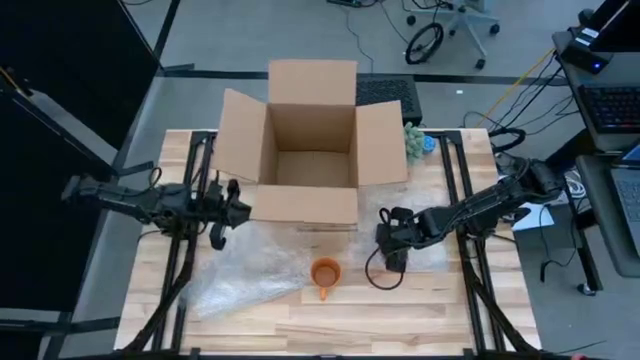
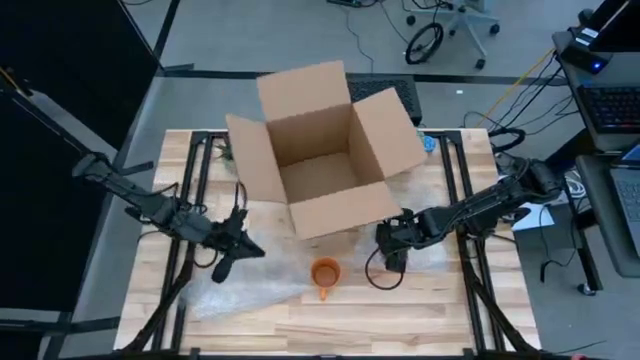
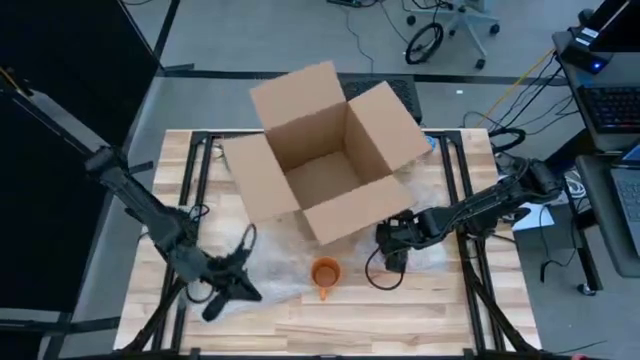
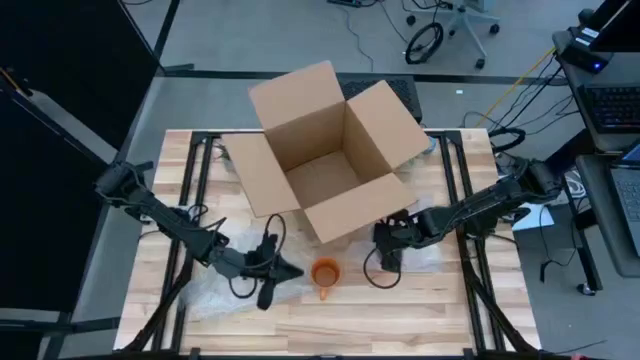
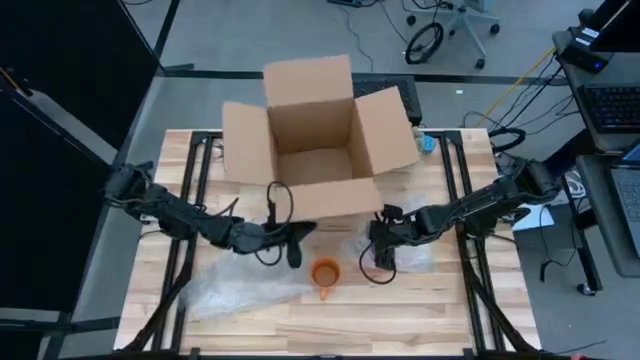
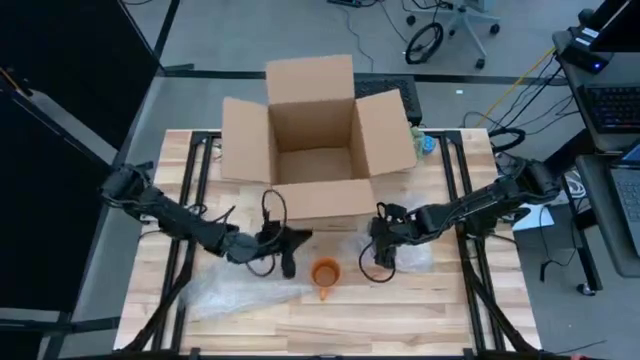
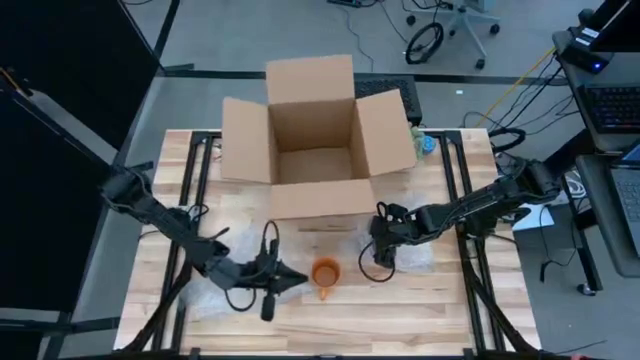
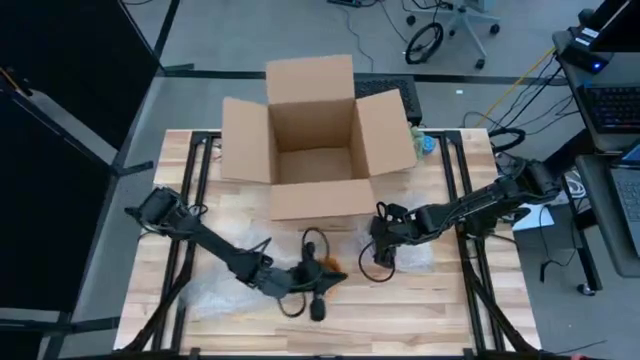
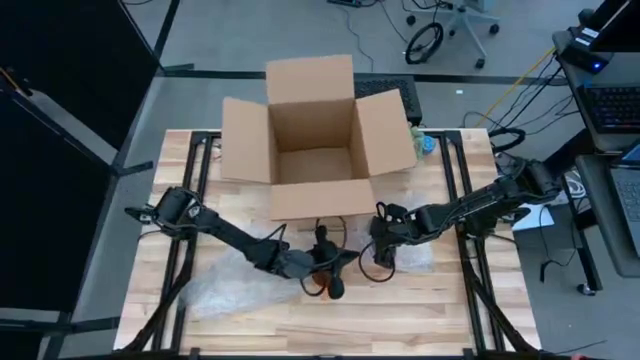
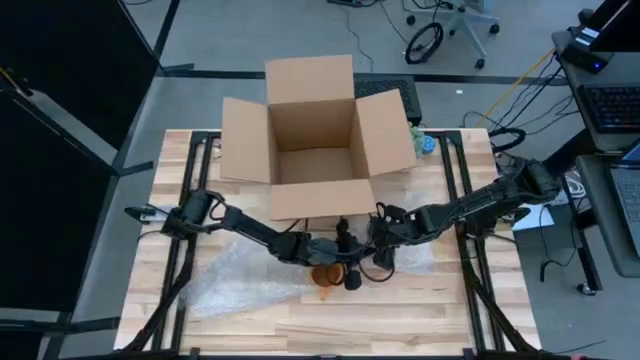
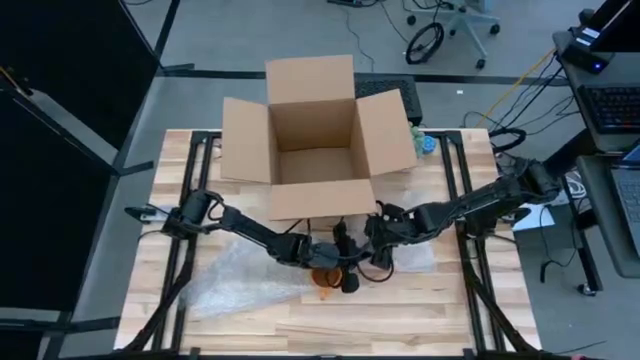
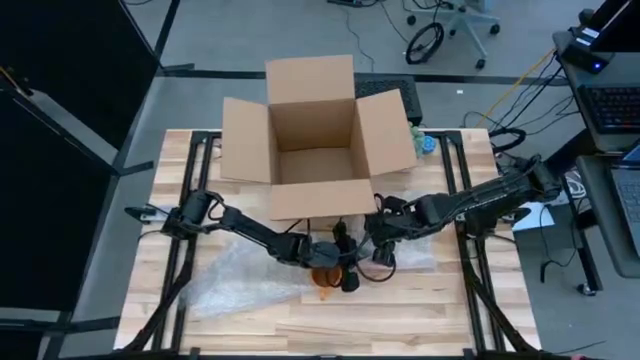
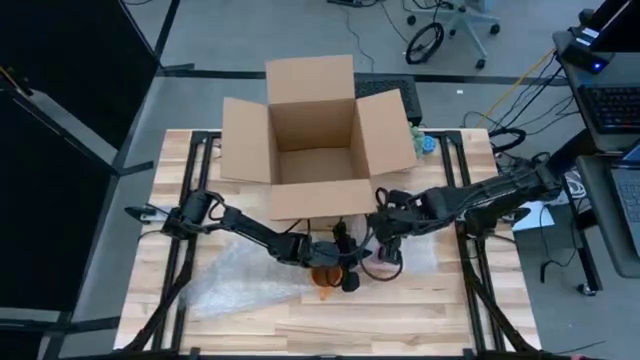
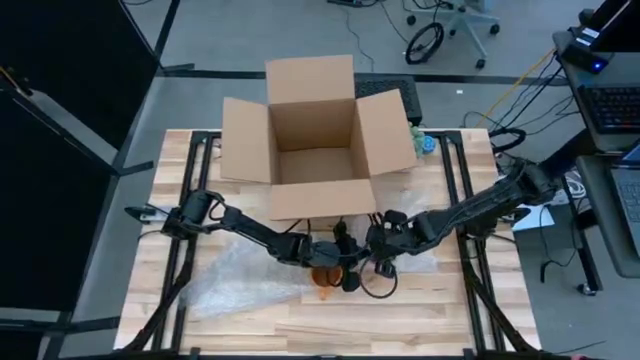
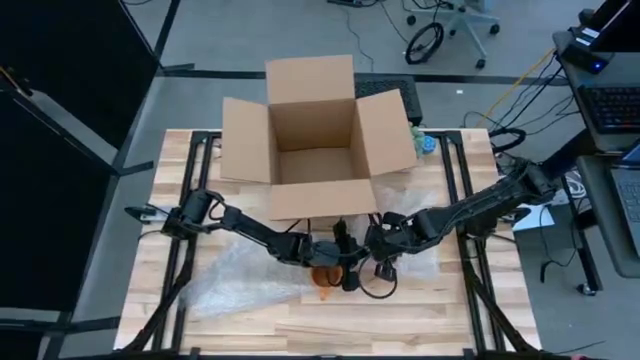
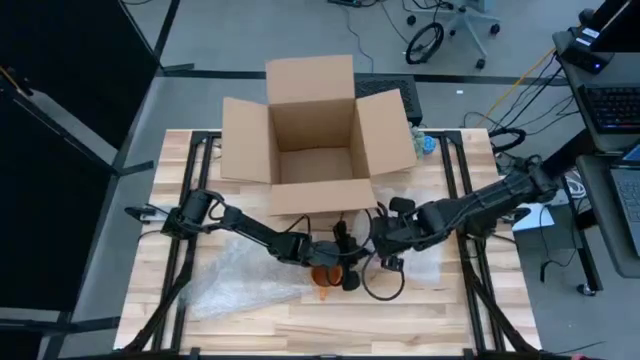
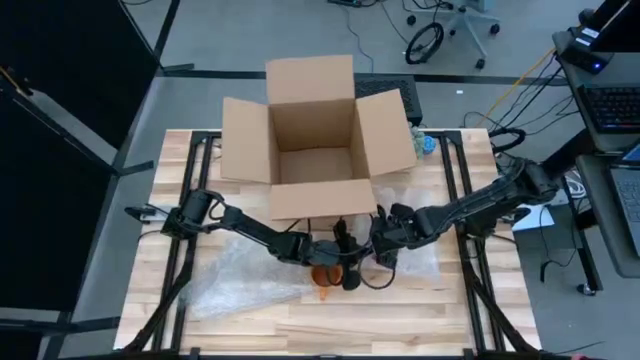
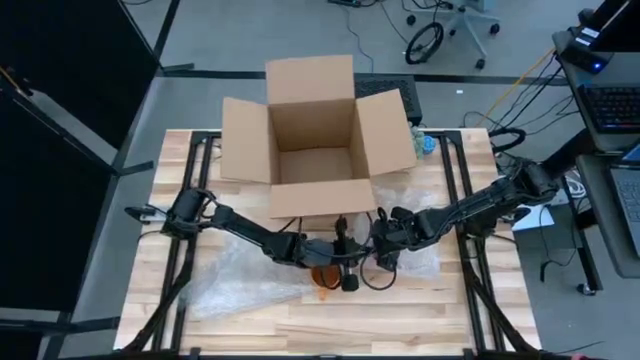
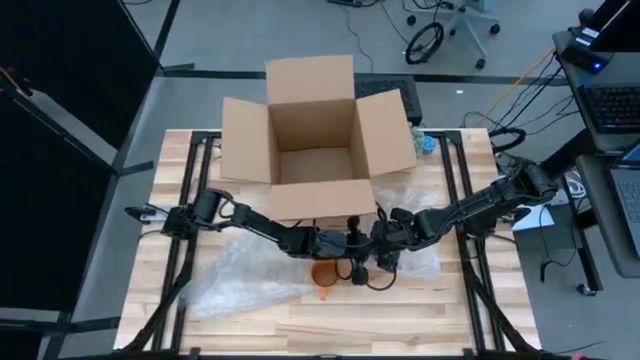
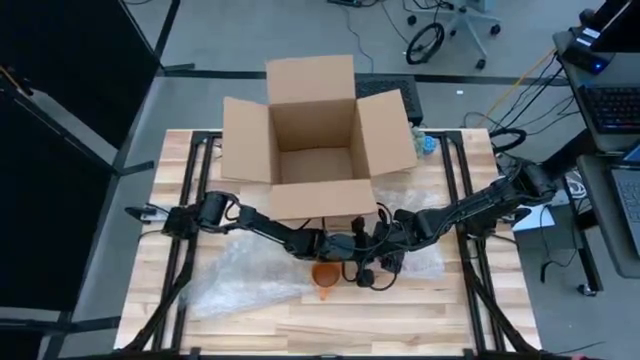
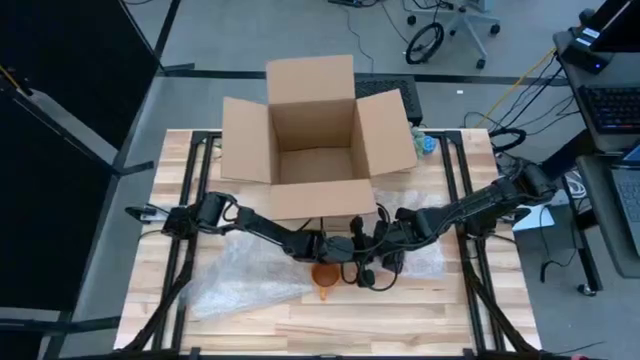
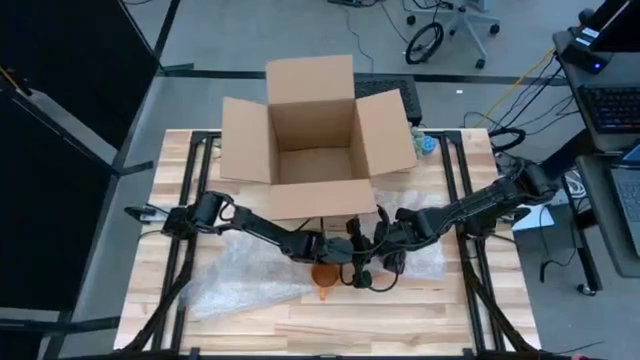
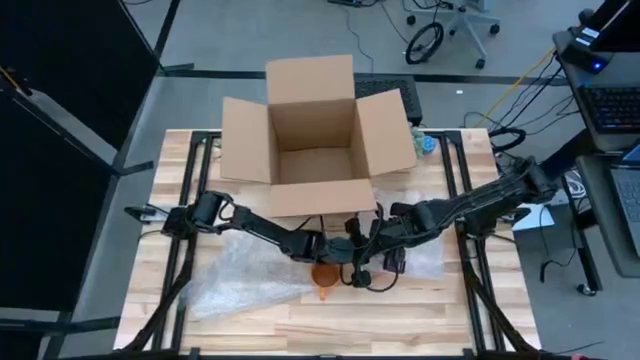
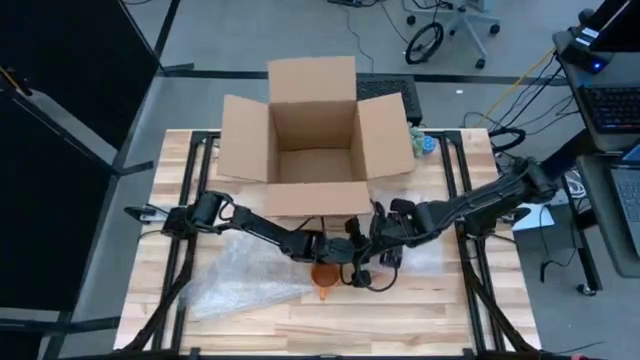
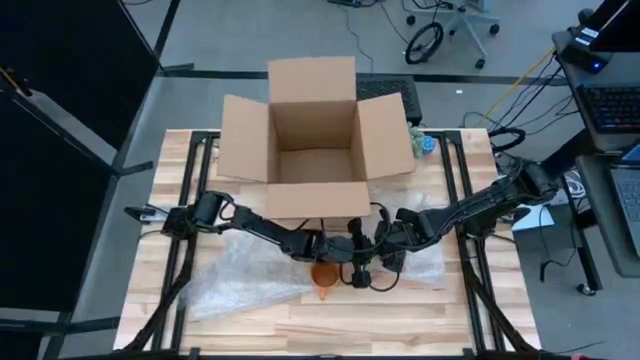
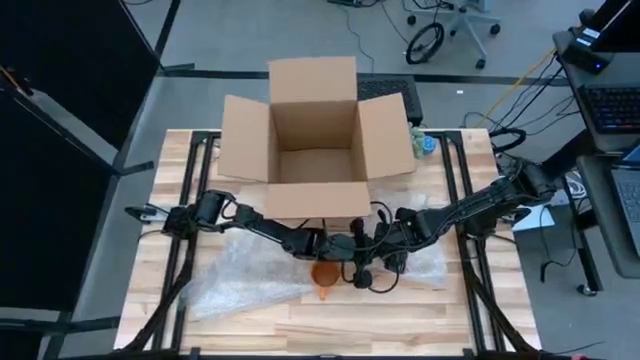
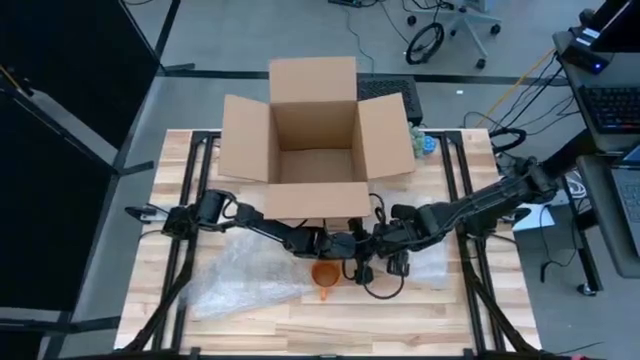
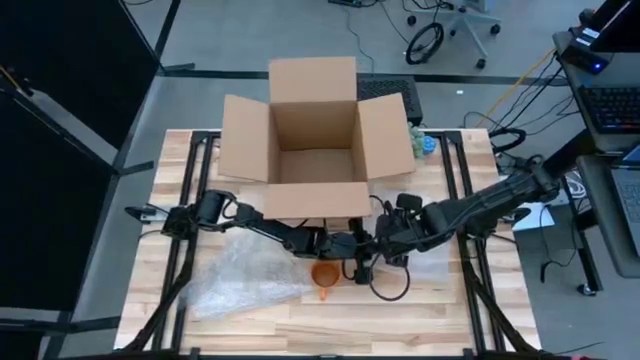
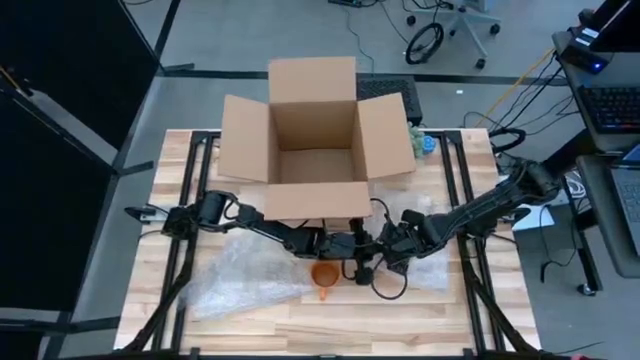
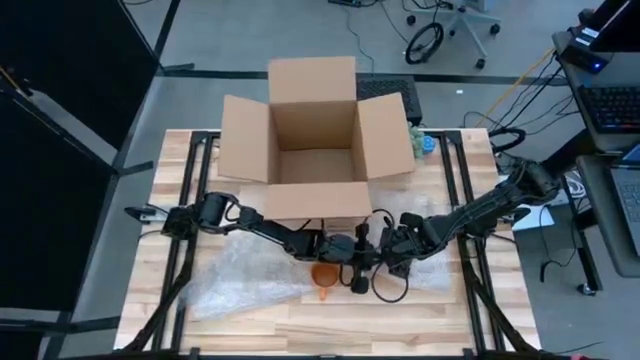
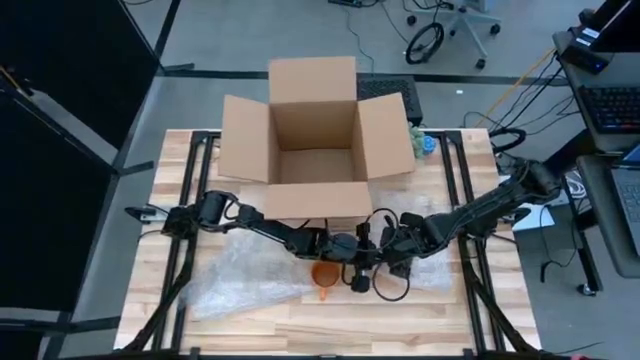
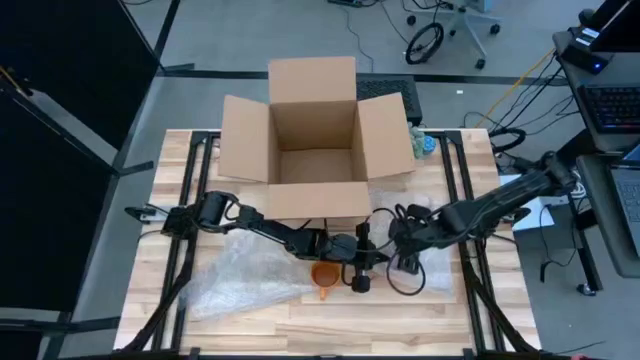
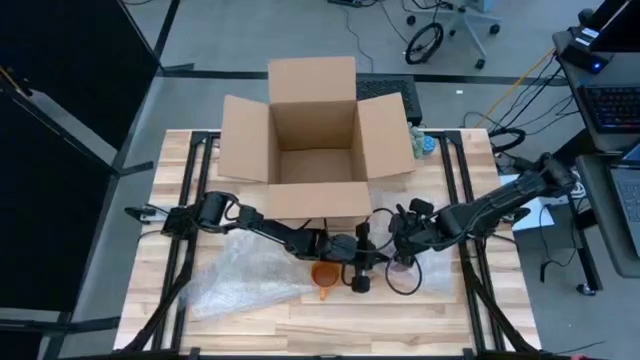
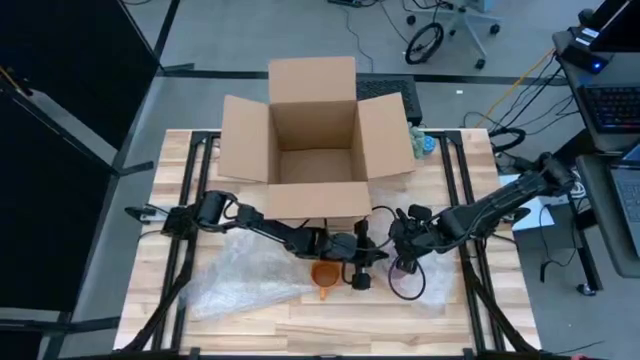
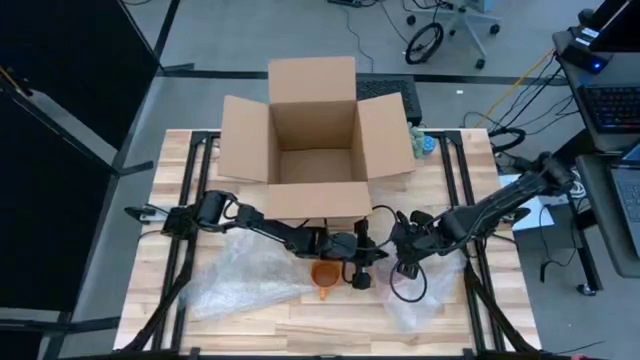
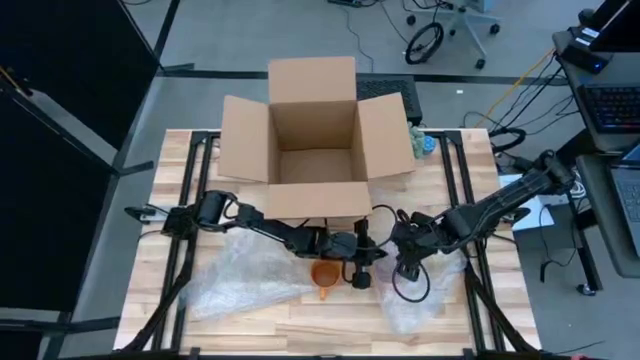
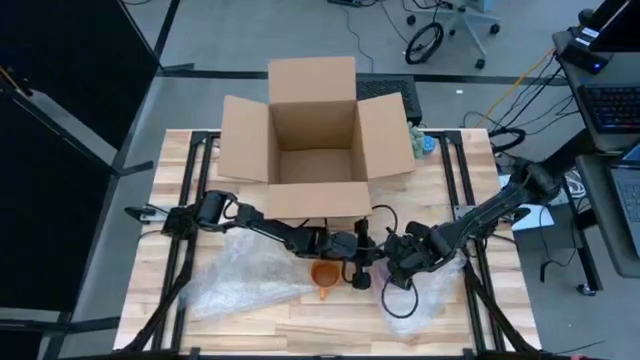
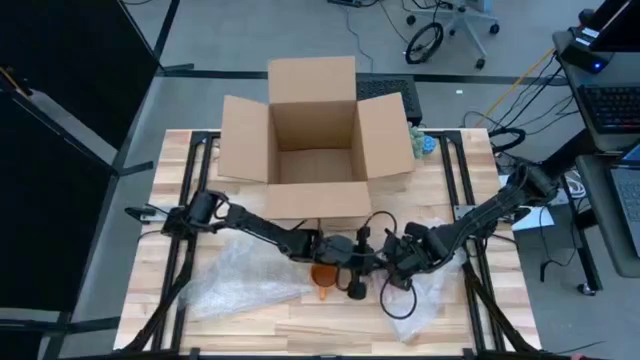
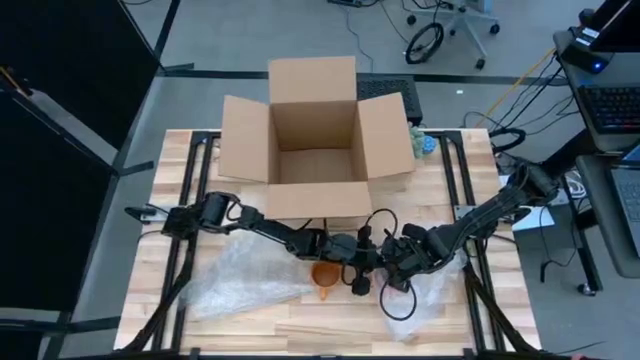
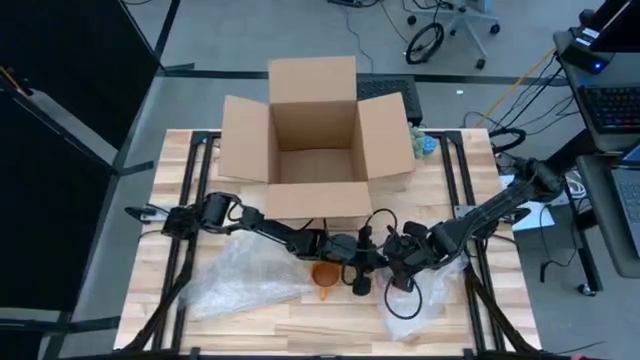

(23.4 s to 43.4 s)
Task: wrap mug
Wrap the pink mug with the transparent bubble wrap
